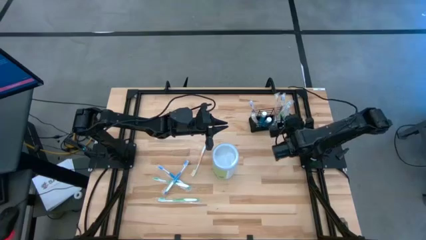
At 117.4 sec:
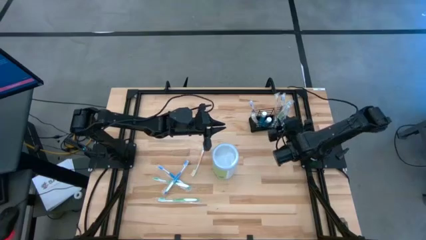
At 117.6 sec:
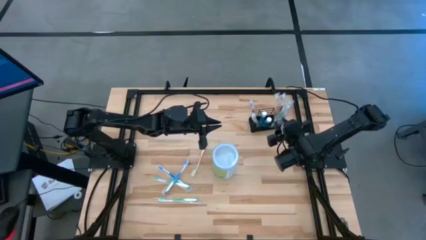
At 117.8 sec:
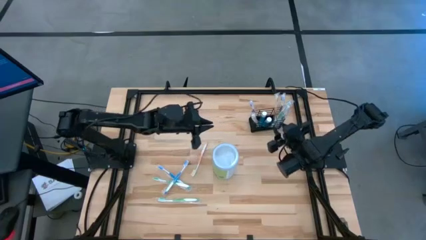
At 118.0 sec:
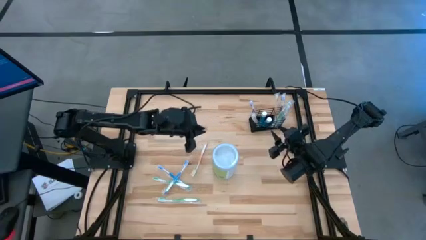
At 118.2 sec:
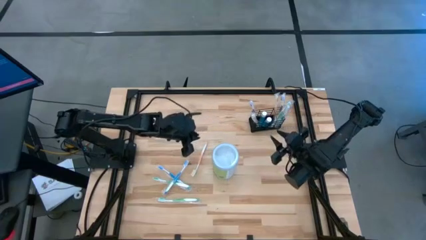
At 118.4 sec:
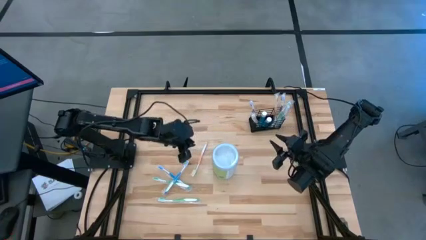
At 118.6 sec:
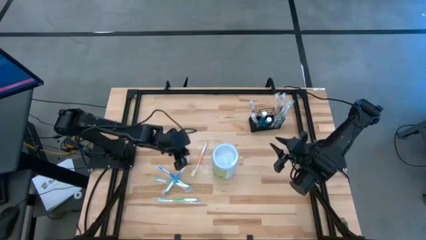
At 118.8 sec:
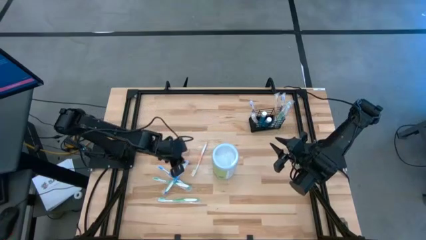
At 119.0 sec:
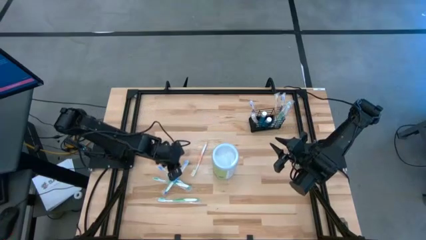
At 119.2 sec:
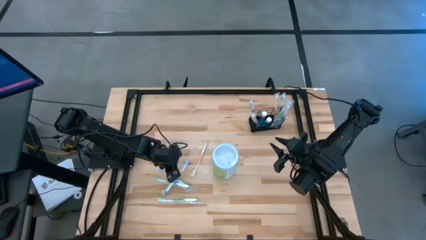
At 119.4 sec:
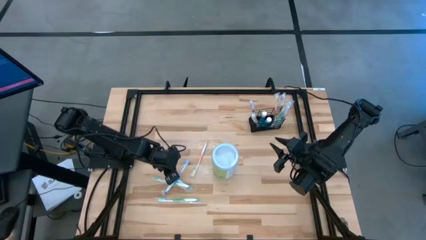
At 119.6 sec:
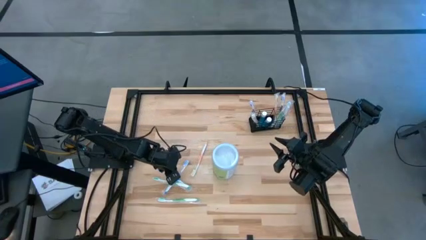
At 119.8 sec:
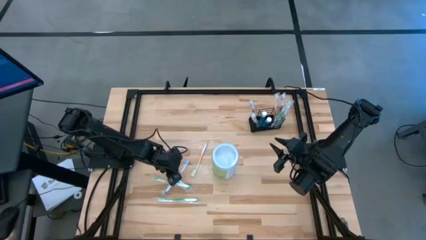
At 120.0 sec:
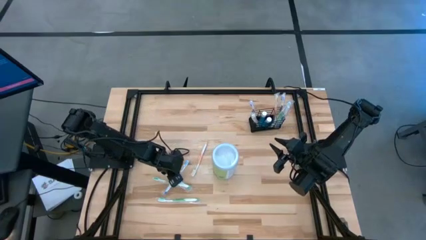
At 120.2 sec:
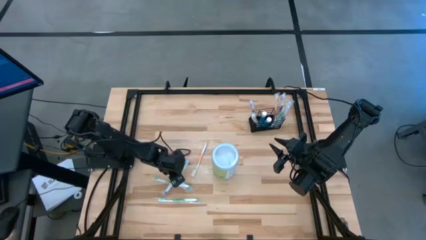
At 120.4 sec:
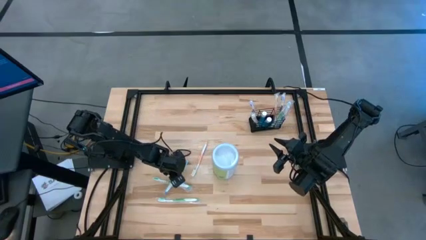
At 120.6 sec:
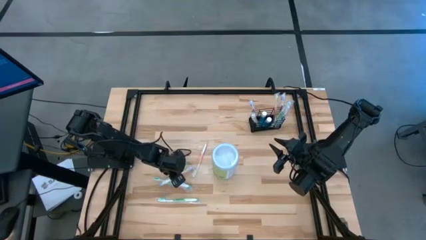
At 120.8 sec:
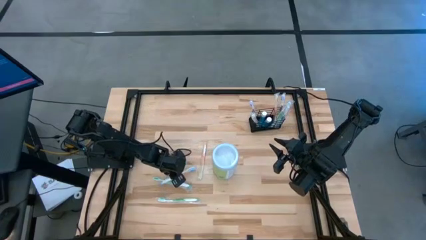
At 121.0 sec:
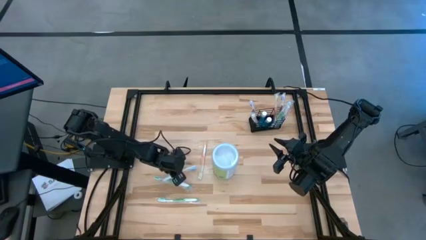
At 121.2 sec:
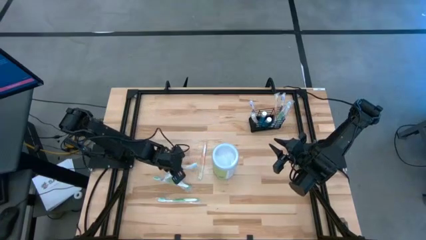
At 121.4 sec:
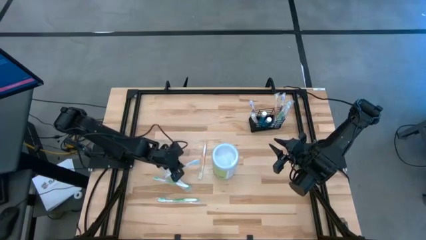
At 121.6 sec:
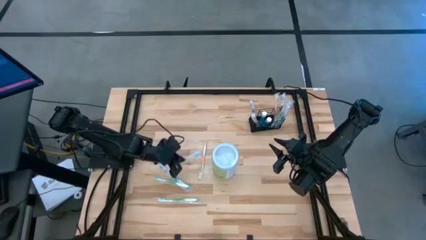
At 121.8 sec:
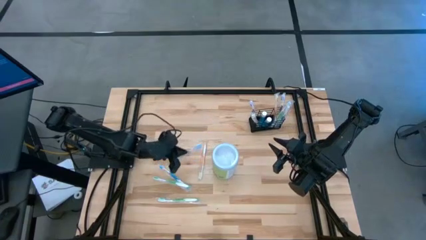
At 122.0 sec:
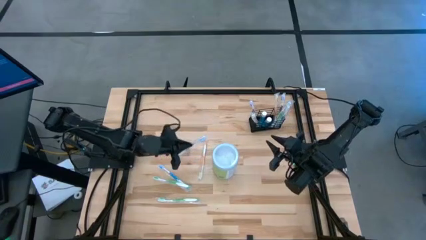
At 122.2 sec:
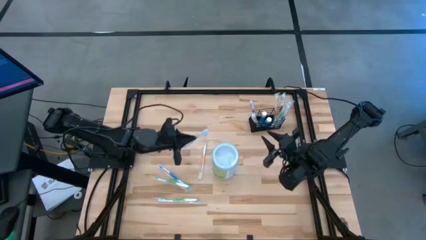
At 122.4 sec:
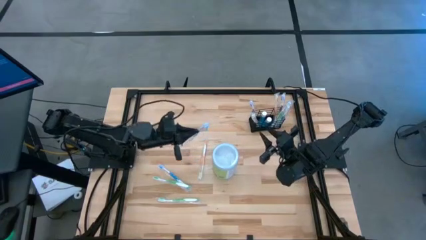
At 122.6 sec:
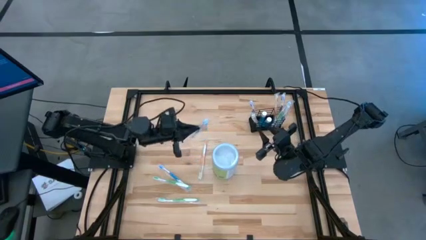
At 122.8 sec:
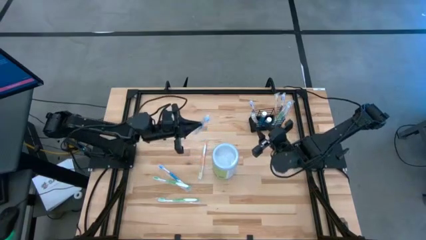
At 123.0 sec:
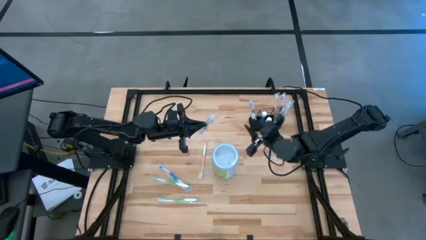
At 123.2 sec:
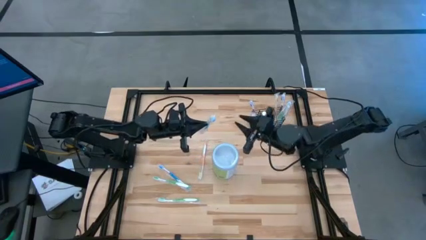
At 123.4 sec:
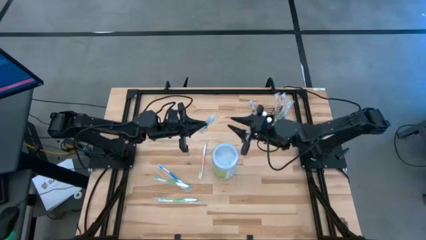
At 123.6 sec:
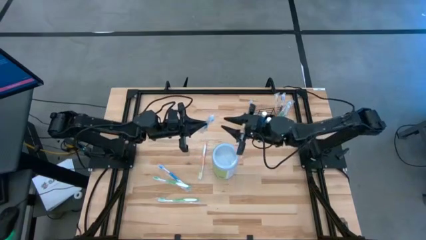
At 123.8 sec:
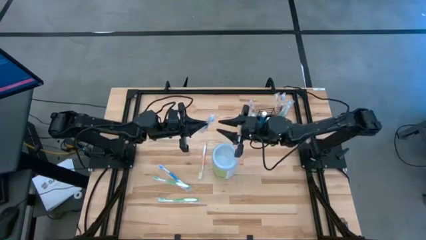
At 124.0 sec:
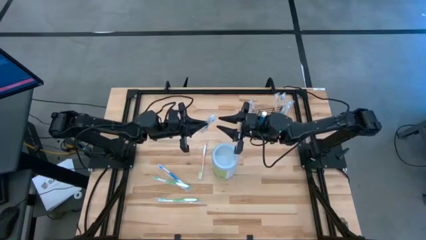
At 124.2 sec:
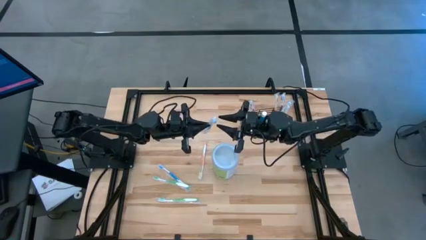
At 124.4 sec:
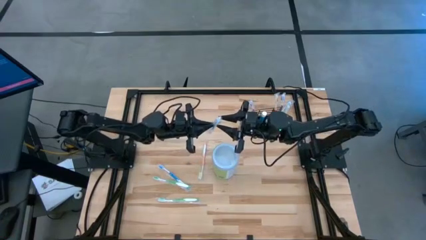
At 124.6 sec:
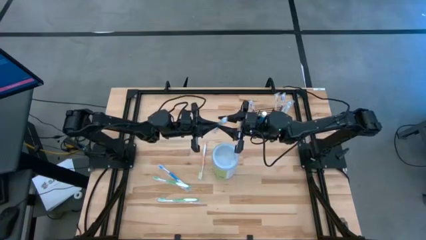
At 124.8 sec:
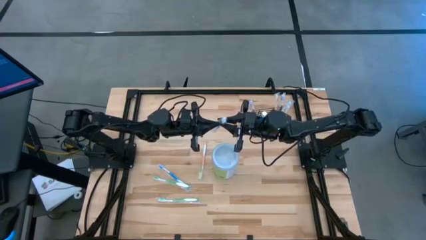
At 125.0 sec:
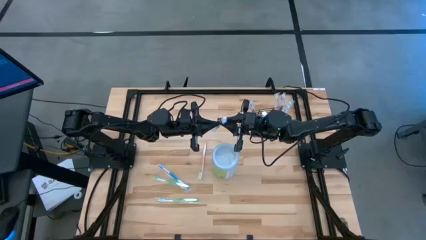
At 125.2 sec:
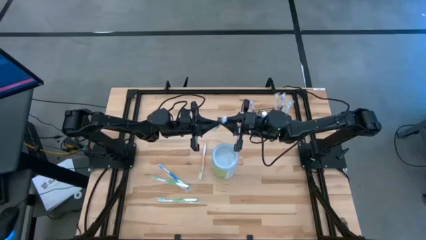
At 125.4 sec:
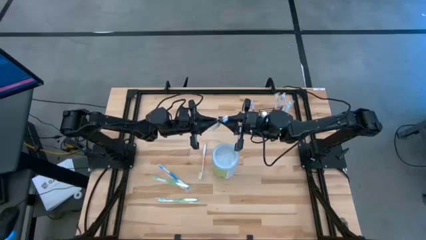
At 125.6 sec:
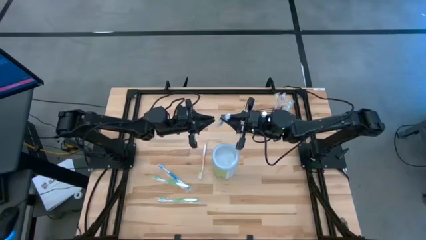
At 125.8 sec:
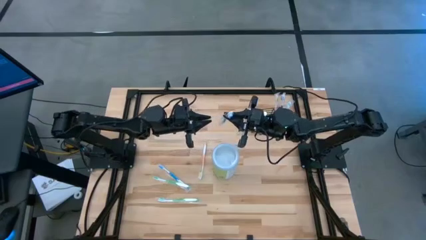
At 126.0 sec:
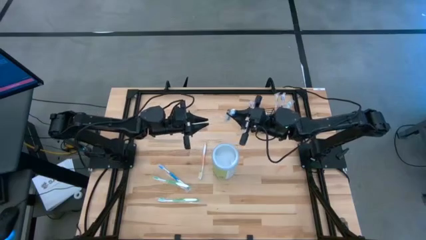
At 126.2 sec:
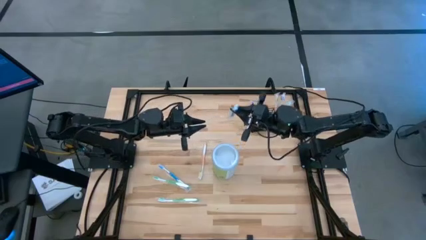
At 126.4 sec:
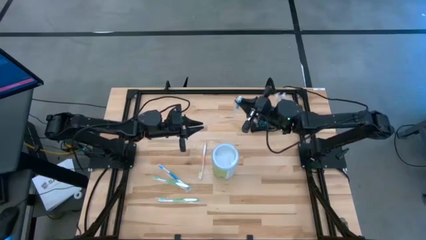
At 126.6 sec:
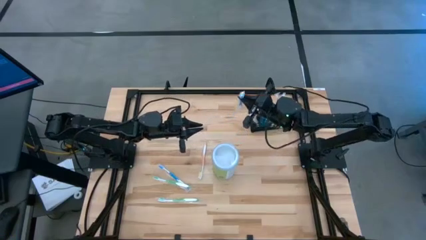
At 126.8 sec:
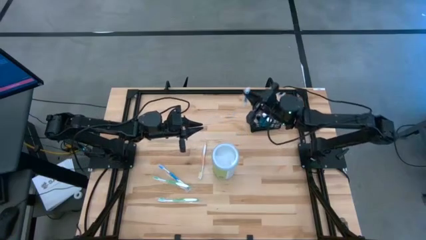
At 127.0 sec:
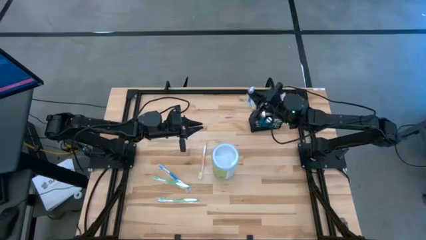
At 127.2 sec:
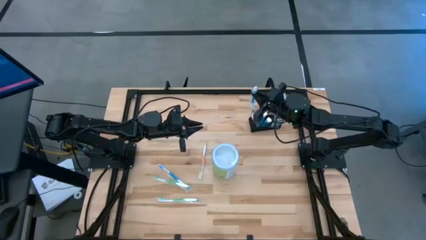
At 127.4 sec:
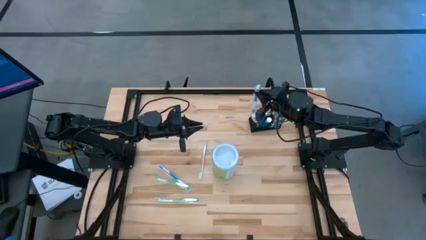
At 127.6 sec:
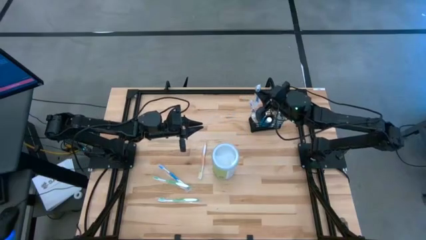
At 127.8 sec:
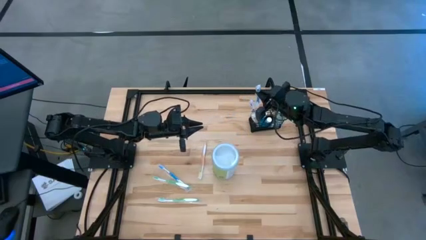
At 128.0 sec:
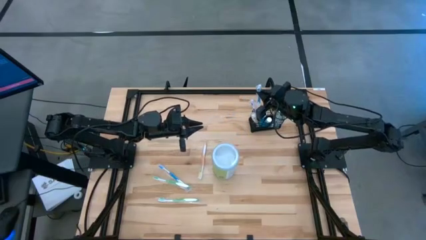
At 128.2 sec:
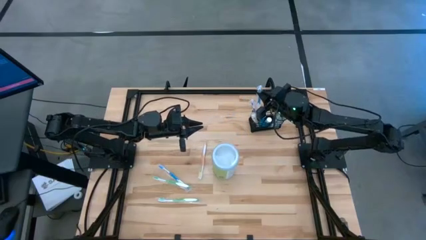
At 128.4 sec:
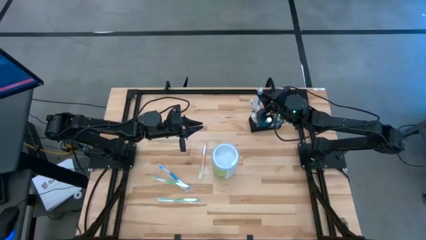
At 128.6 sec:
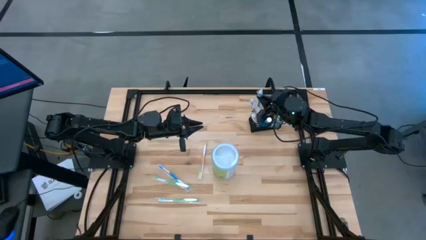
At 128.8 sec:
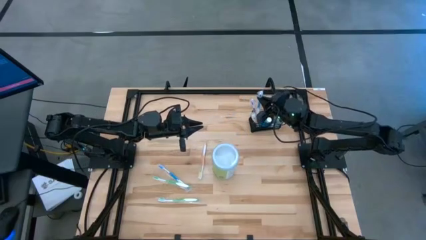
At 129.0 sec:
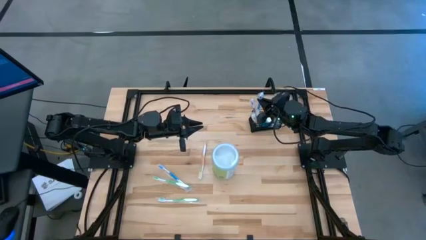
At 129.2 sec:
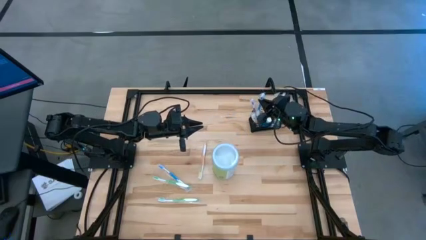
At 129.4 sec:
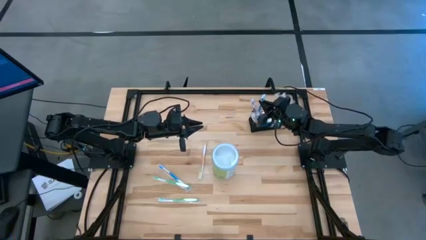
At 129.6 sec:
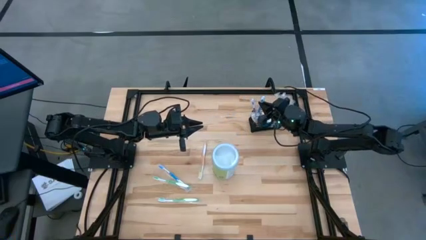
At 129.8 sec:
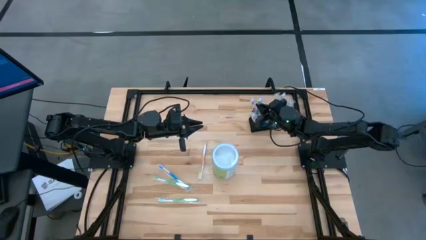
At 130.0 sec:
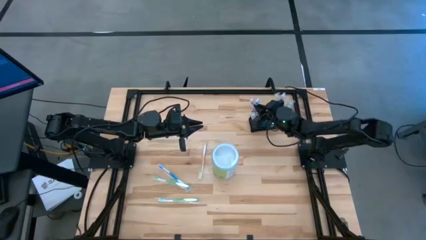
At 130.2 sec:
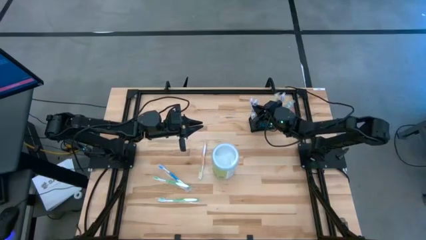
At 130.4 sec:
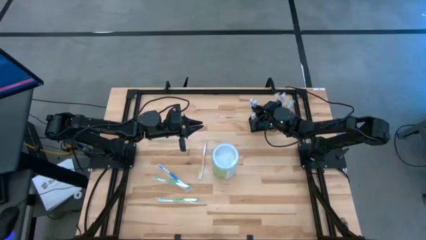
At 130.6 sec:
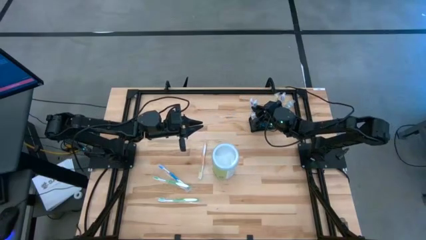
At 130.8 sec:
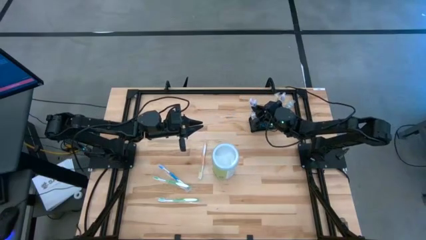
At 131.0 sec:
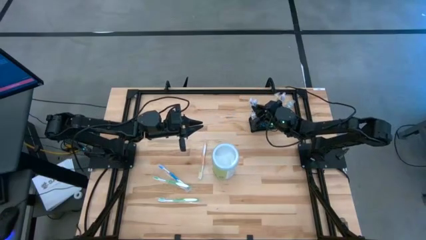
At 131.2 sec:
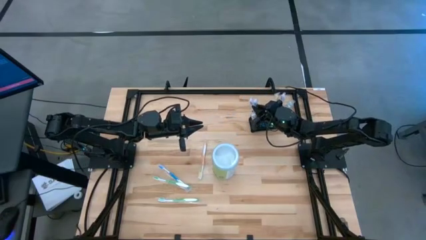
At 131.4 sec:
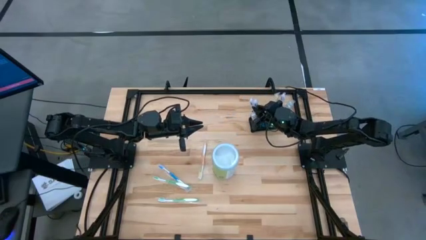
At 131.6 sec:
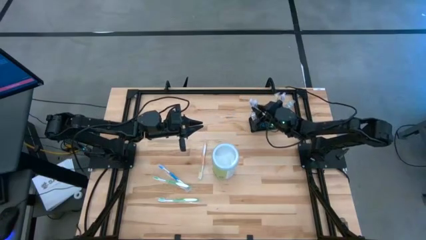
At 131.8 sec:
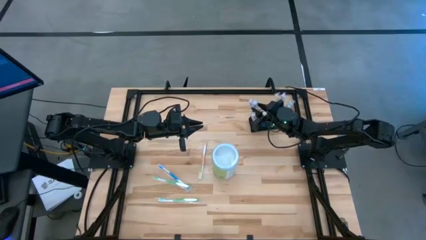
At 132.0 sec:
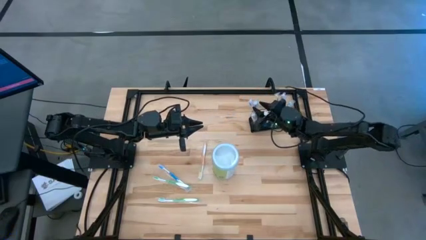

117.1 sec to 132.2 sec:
Task: Pick & Place toothbrushing station
Put the blue toothbrush into the wire organizer
